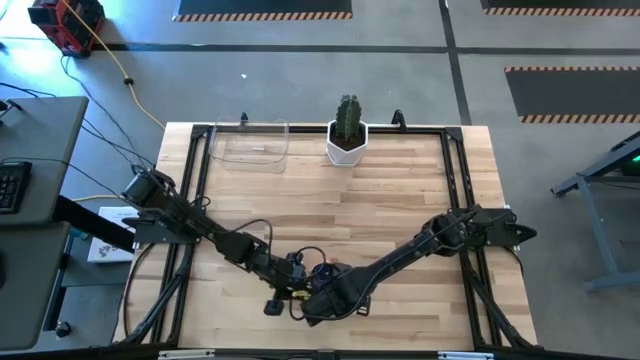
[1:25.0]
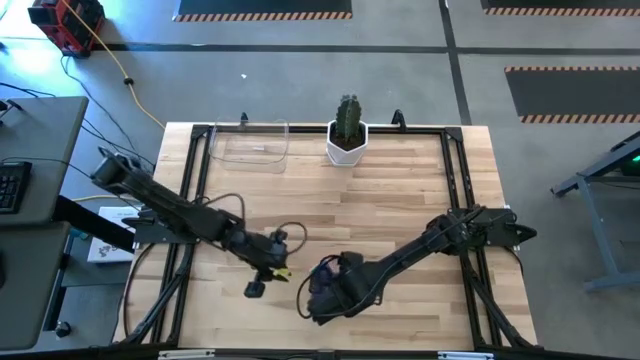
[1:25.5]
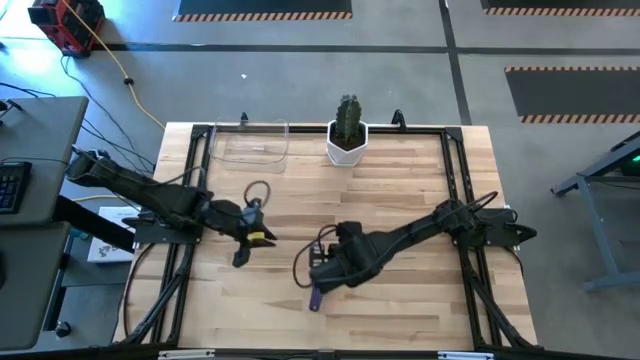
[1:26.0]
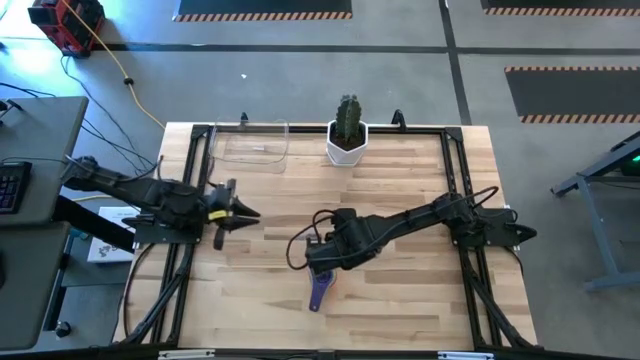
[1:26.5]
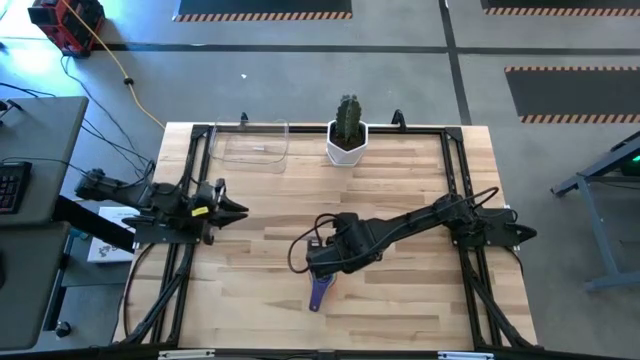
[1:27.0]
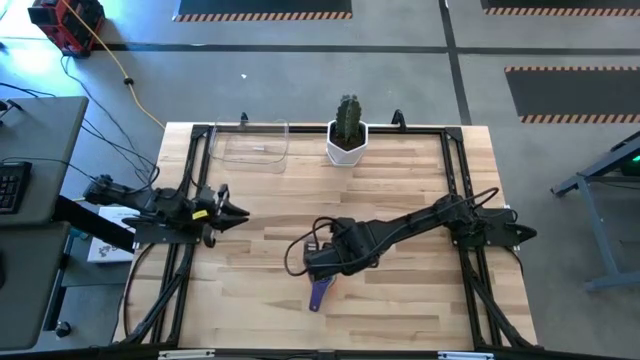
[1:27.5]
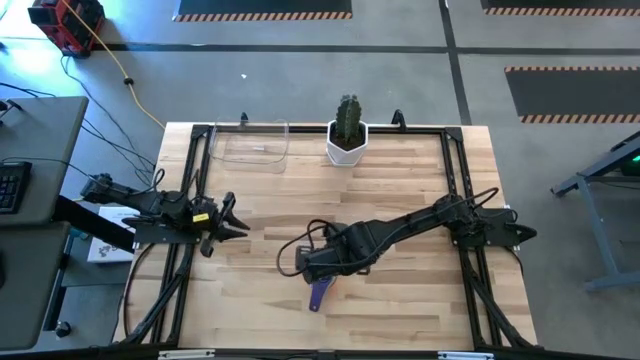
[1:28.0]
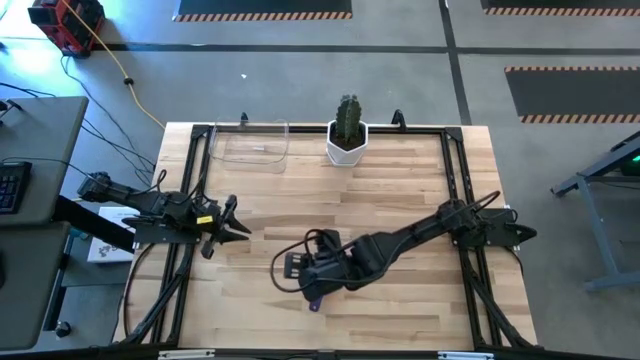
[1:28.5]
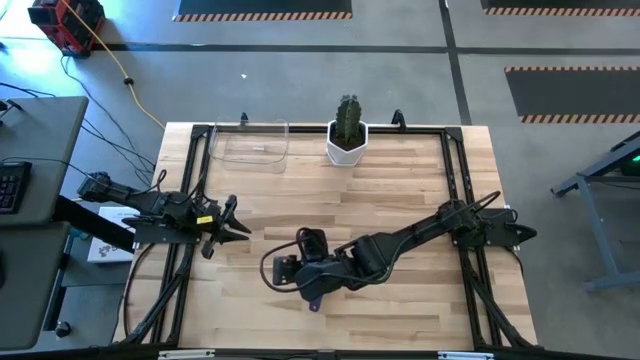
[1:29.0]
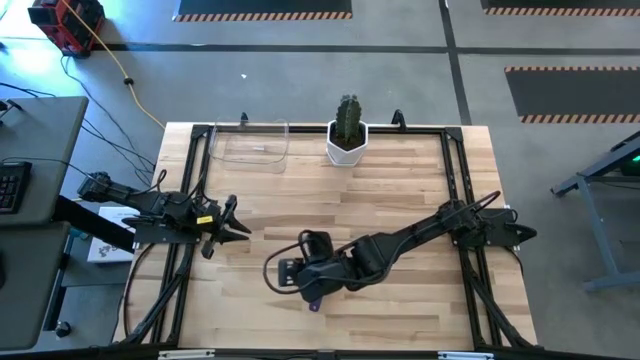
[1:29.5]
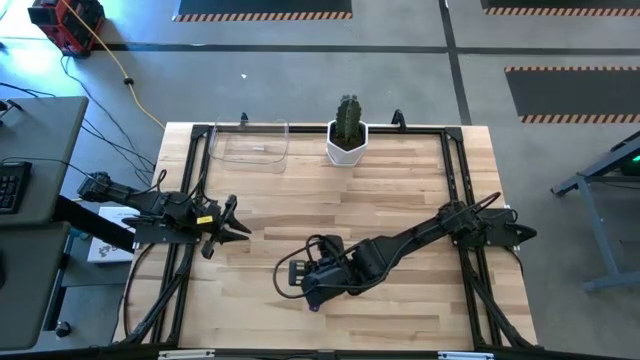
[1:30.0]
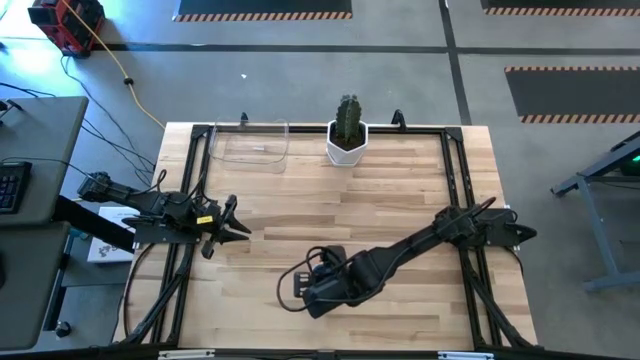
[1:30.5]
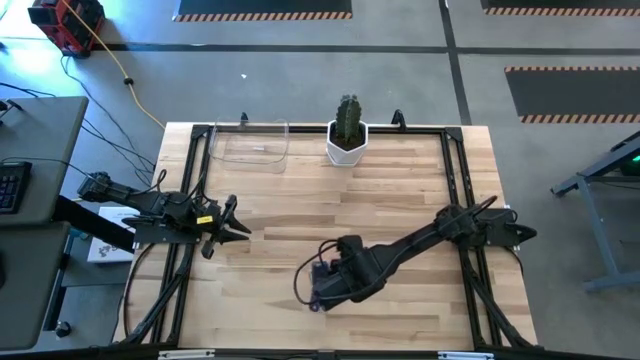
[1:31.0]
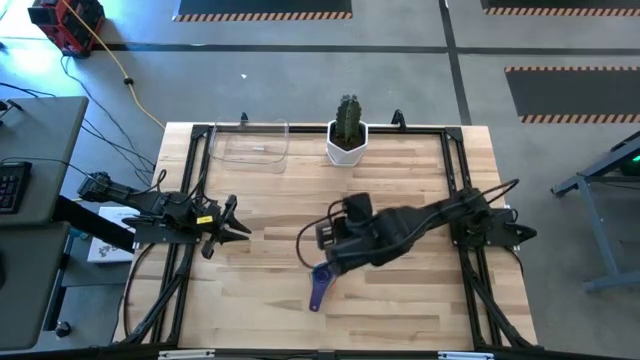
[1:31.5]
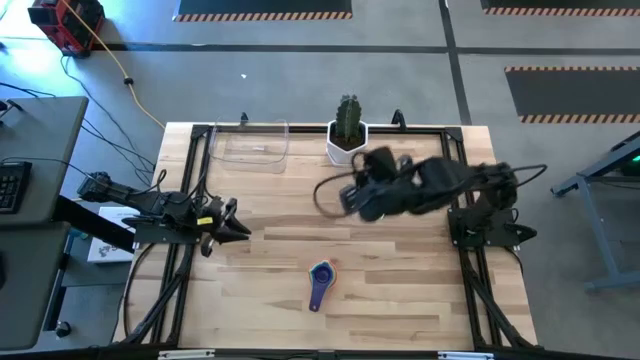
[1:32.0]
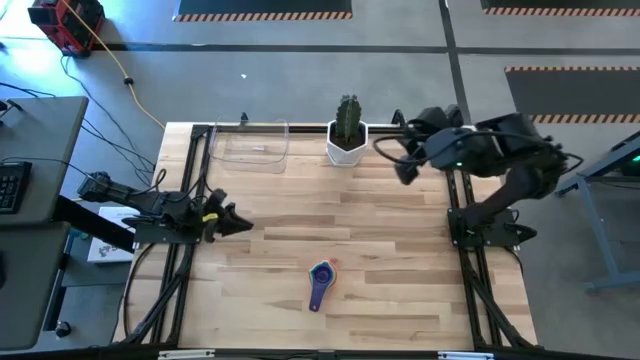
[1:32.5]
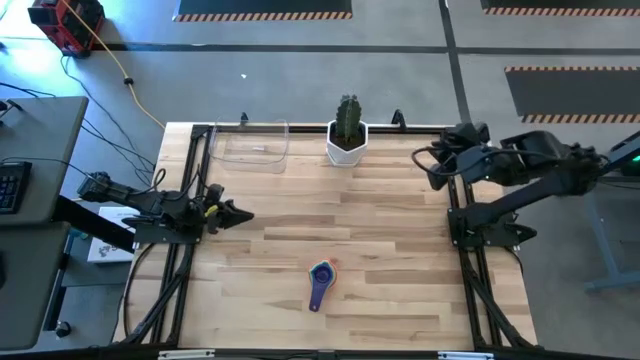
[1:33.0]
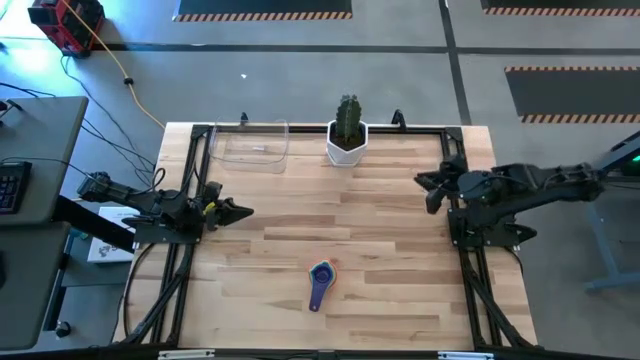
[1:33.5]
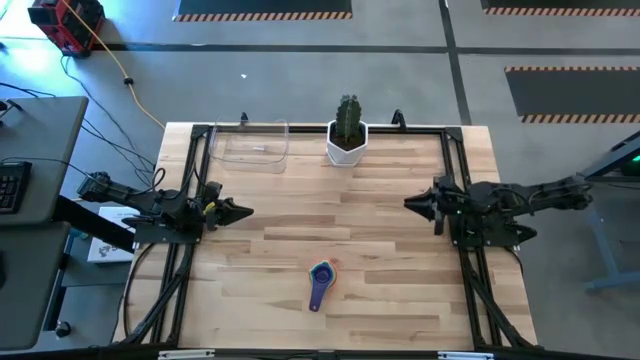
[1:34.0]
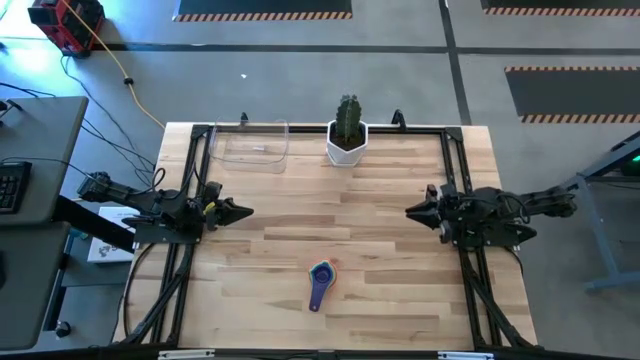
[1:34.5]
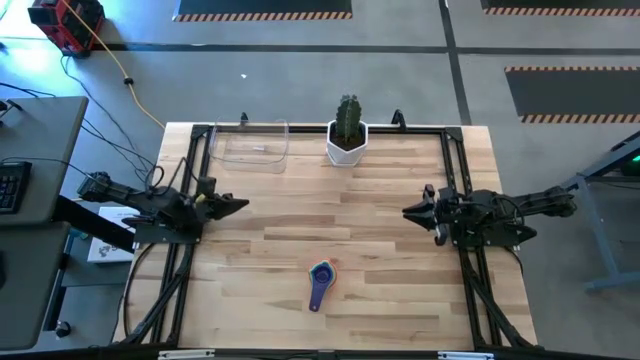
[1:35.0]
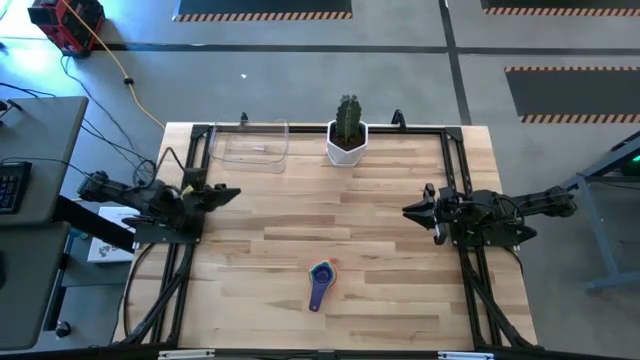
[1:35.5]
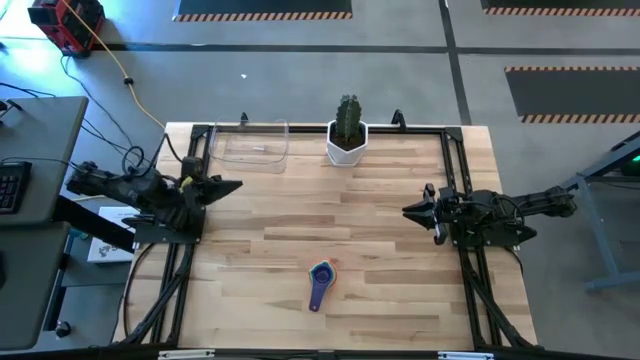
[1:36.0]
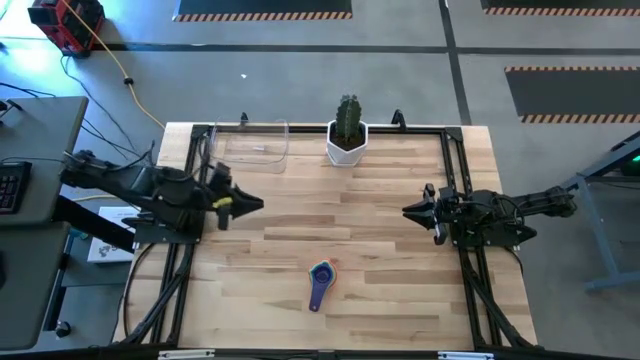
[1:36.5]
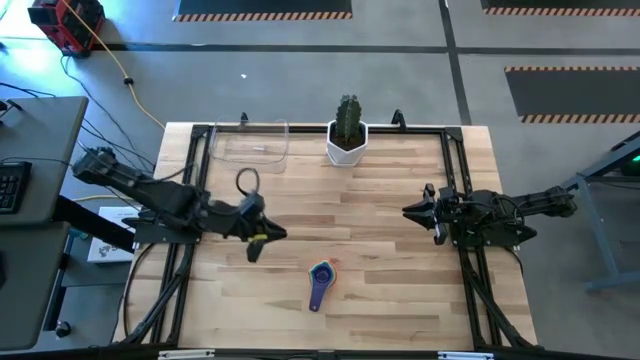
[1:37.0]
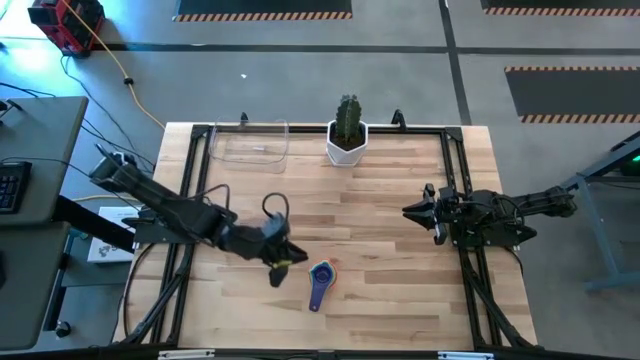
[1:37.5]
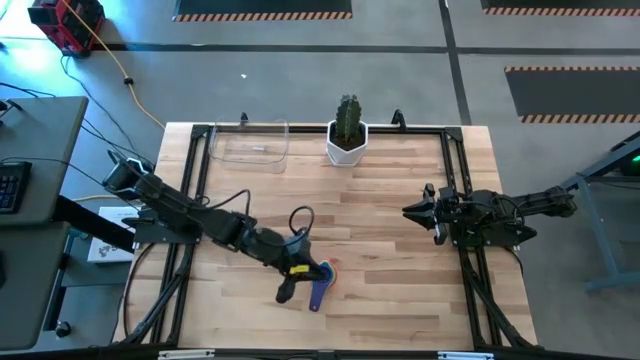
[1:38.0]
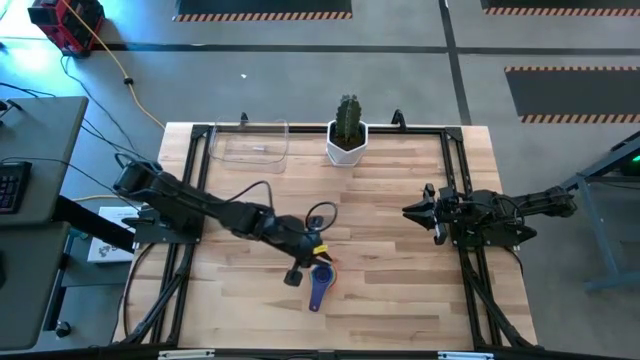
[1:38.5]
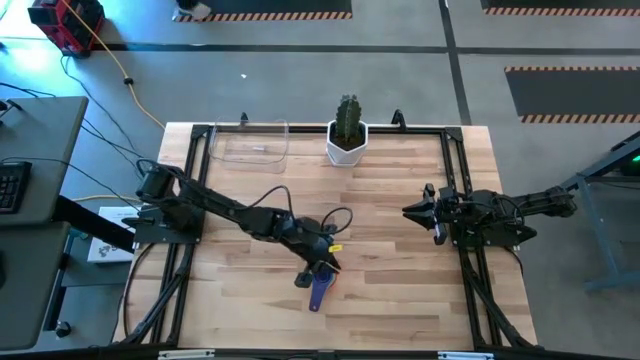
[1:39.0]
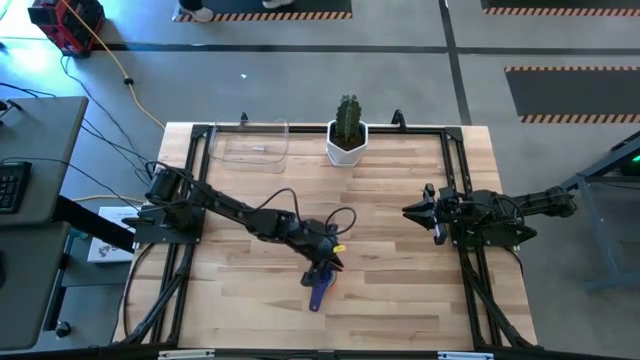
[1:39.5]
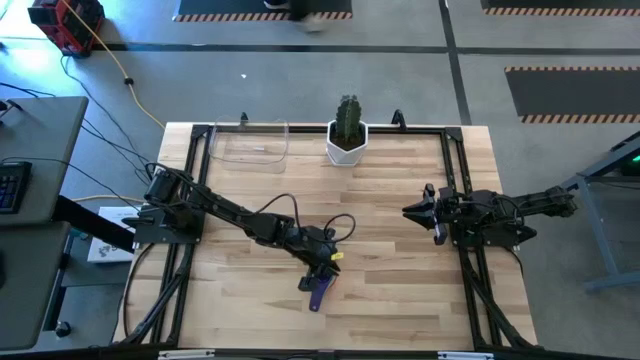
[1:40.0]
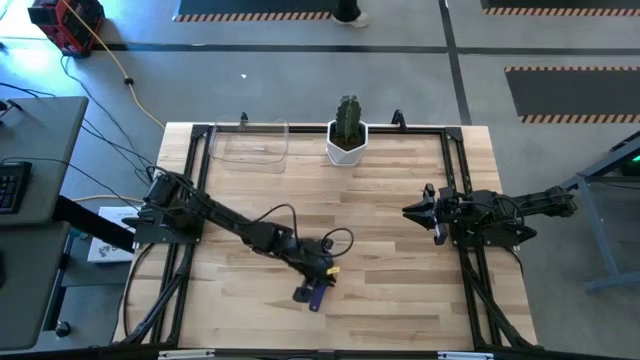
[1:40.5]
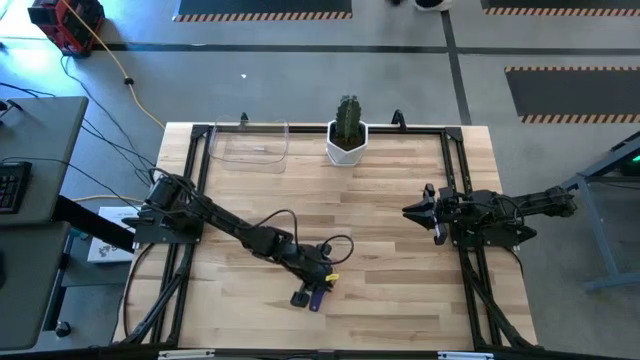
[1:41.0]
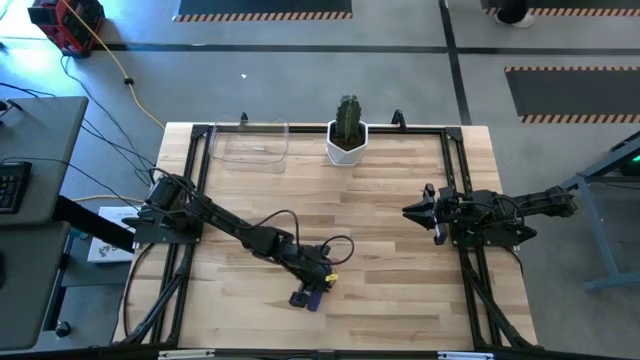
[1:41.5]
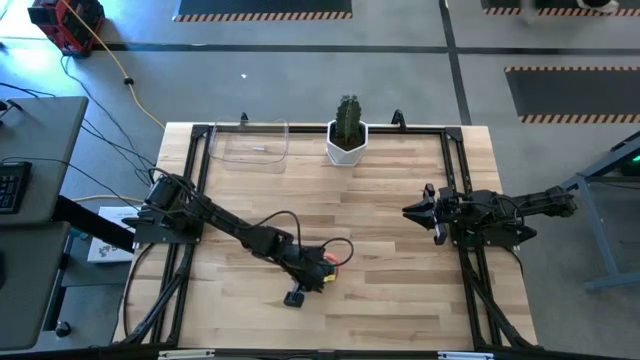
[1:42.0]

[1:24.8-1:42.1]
Task: Nest measuring cups in basket
Put the nested measuring cups into the transparent bin

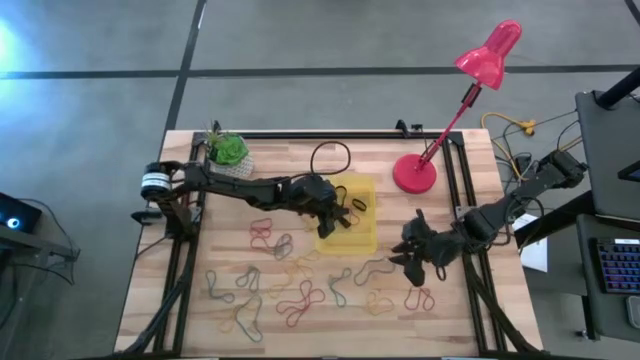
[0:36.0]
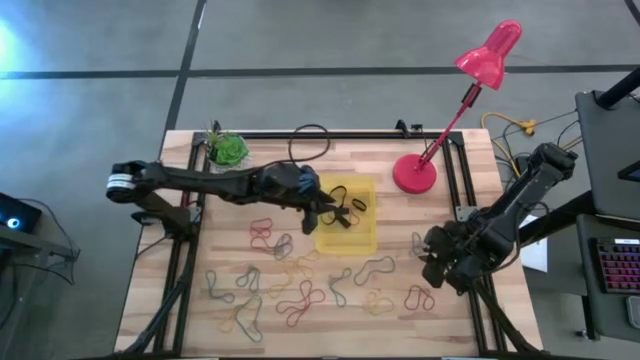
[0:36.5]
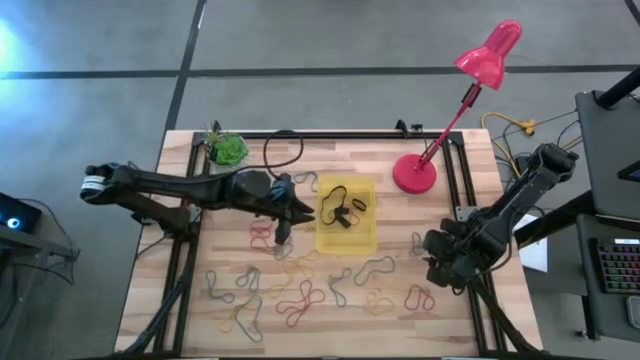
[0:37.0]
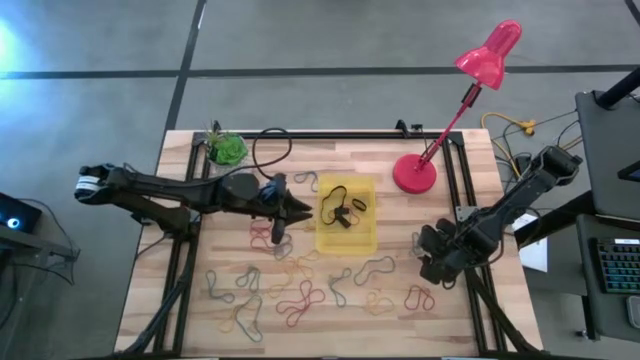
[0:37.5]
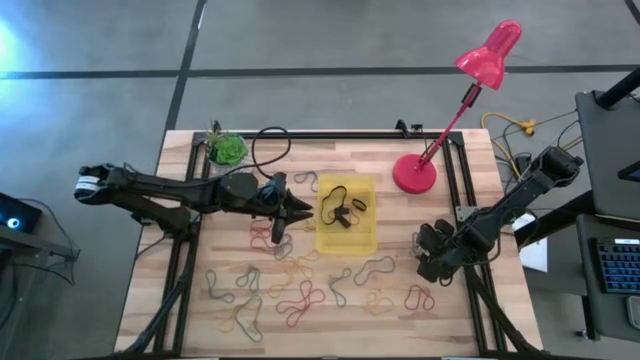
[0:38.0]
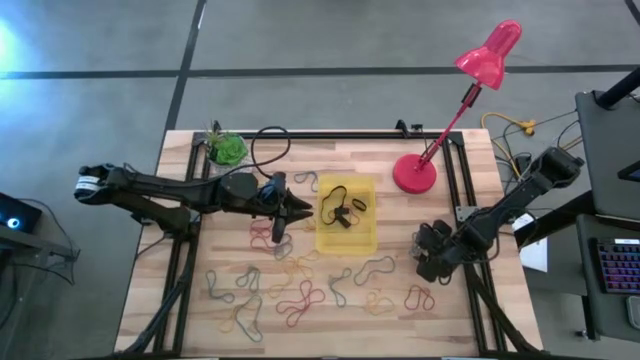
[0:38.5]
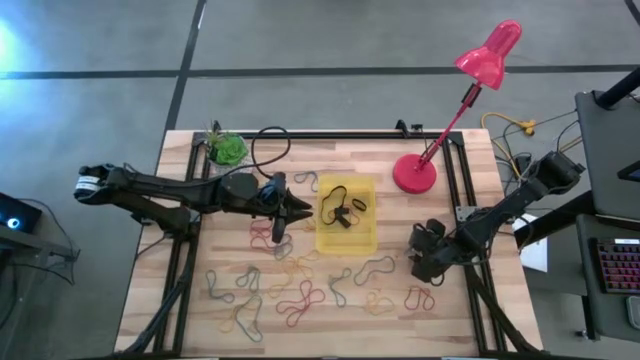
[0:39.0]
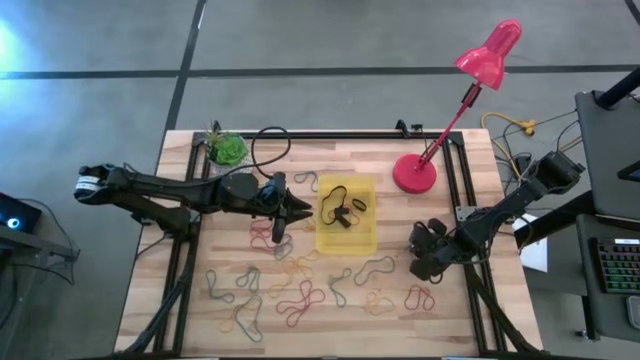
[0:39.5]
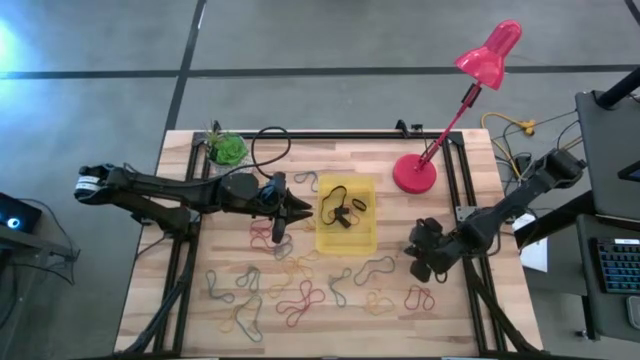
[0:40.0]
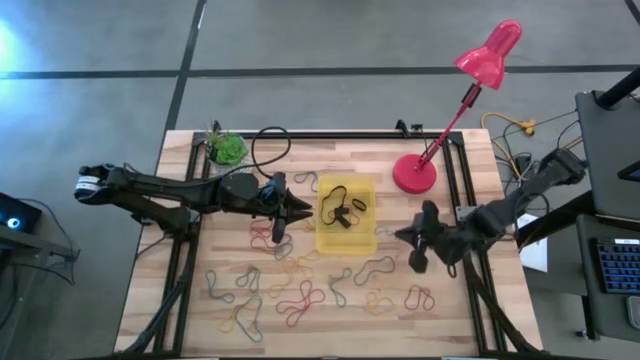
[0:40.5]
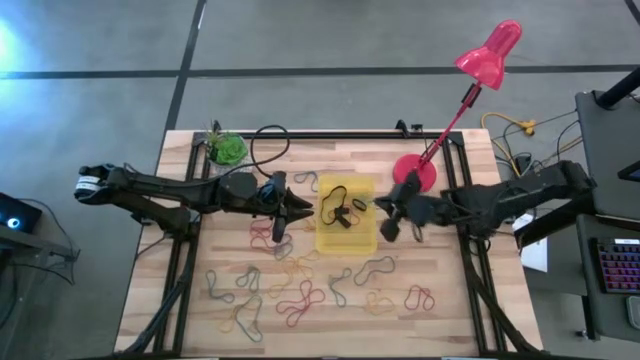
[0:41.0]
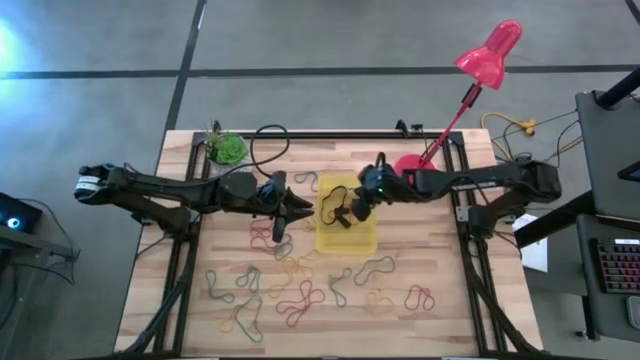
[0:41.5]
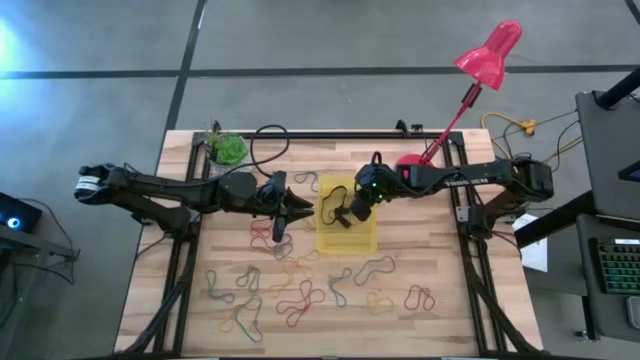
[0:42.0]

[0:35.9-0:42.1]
Task: Pick and place rubber bands into bin
Put the blue rubber band into the bin
